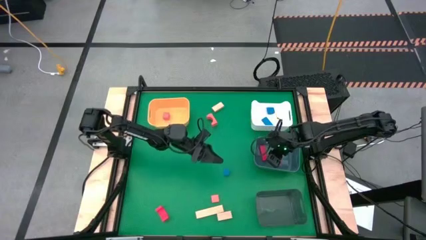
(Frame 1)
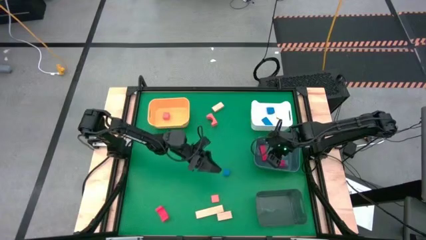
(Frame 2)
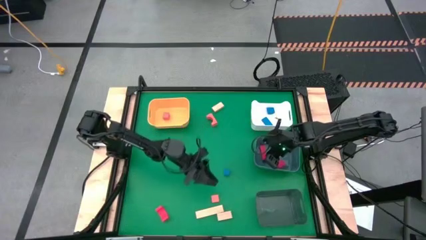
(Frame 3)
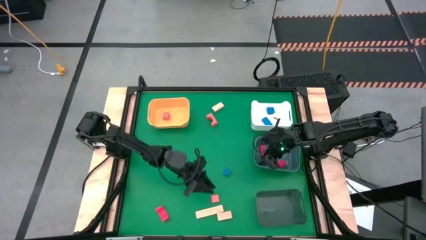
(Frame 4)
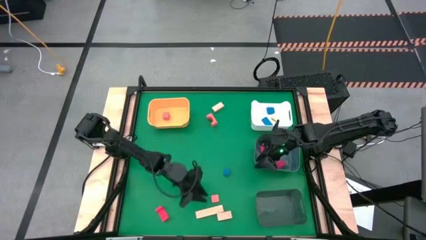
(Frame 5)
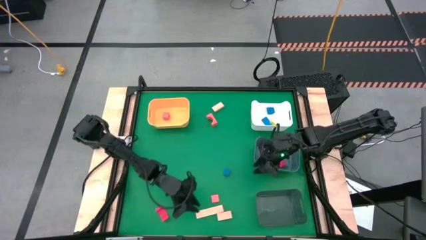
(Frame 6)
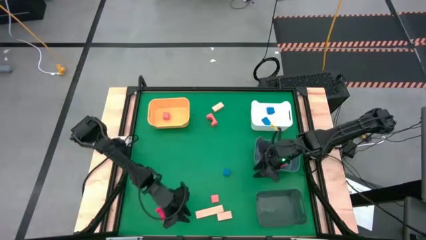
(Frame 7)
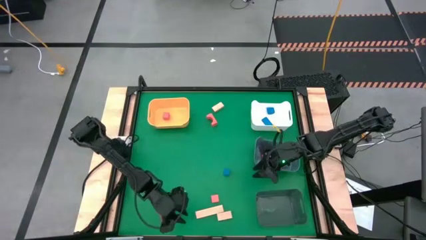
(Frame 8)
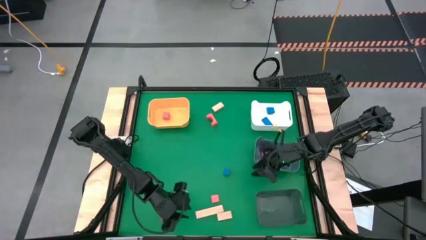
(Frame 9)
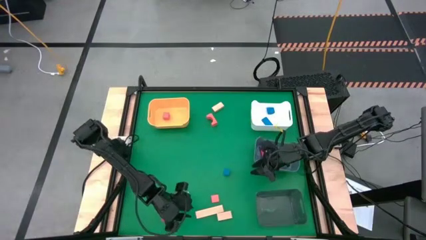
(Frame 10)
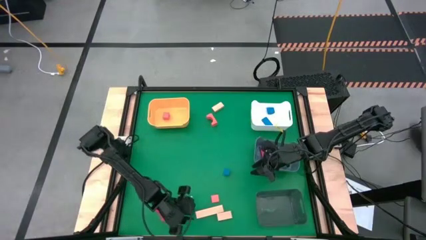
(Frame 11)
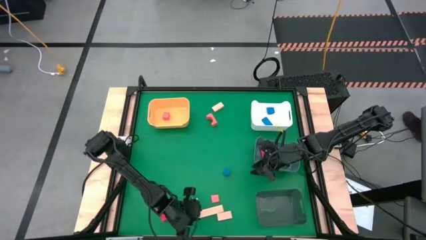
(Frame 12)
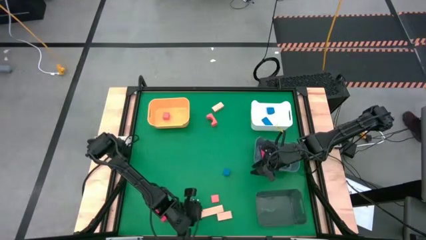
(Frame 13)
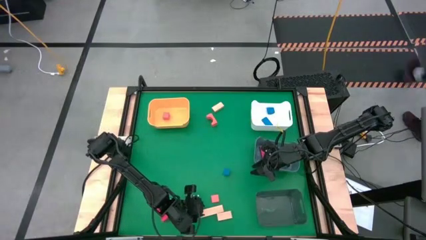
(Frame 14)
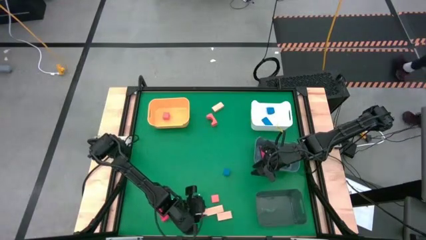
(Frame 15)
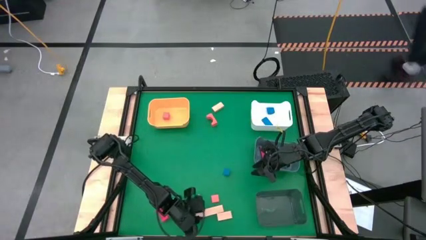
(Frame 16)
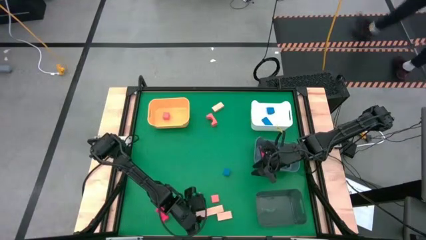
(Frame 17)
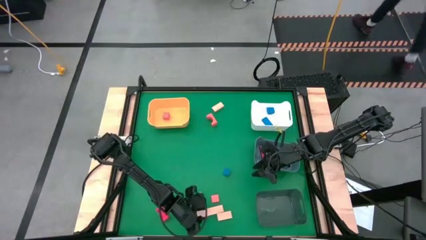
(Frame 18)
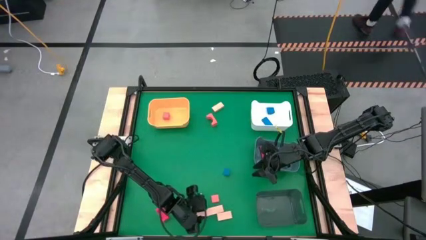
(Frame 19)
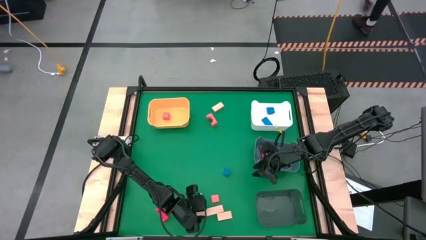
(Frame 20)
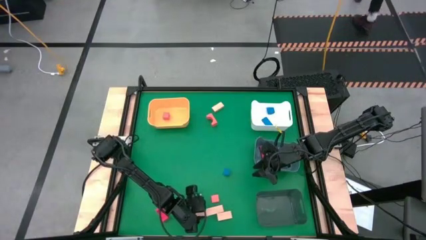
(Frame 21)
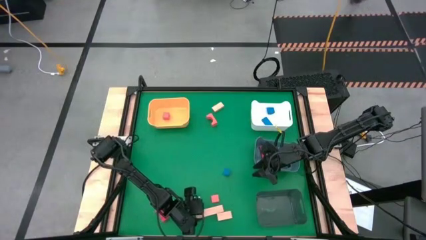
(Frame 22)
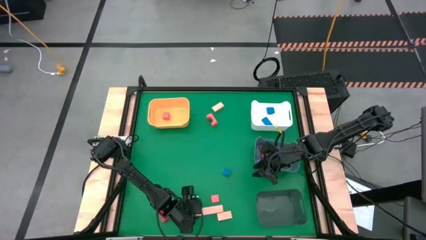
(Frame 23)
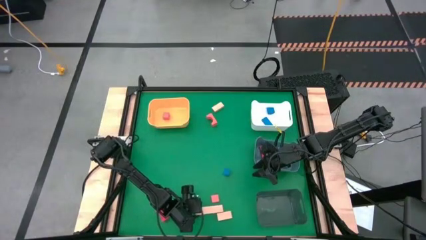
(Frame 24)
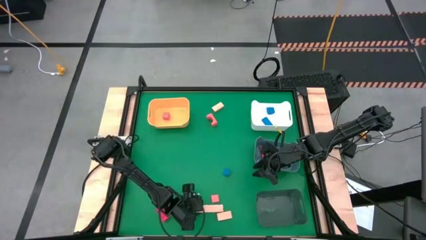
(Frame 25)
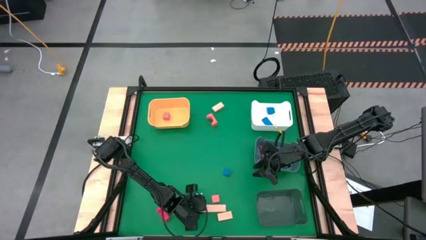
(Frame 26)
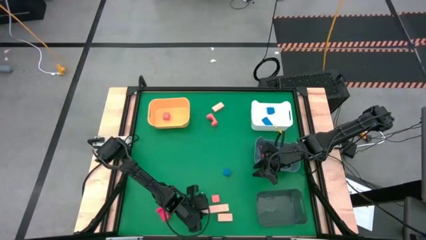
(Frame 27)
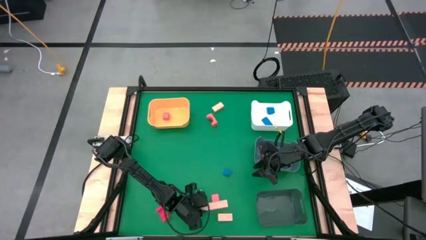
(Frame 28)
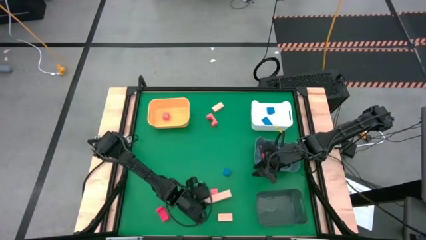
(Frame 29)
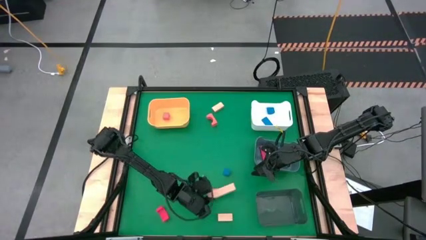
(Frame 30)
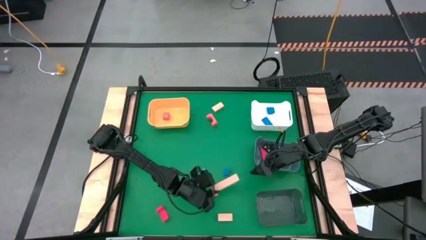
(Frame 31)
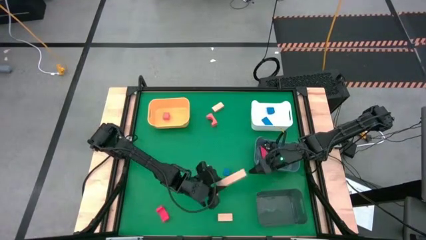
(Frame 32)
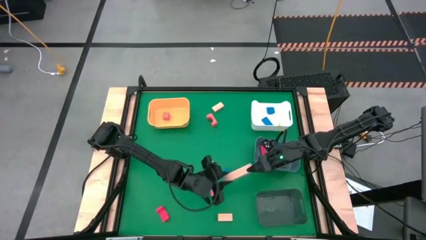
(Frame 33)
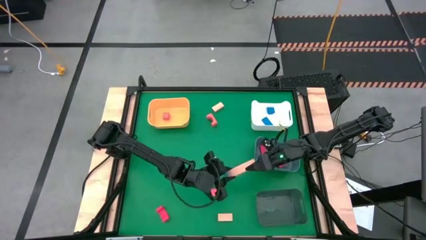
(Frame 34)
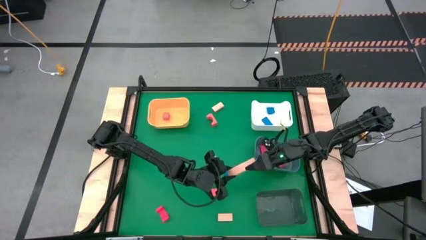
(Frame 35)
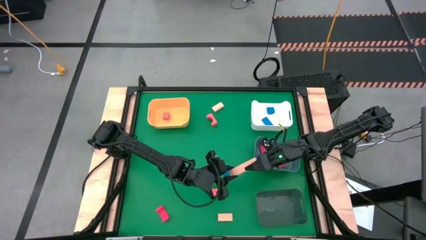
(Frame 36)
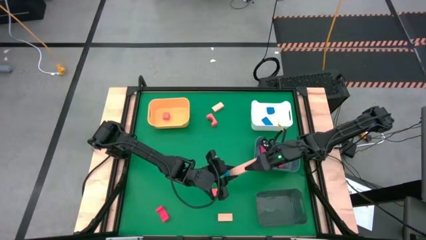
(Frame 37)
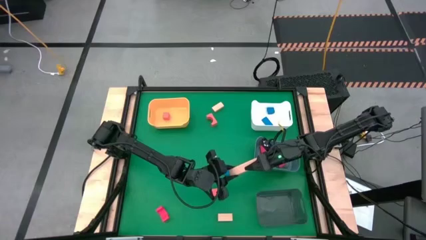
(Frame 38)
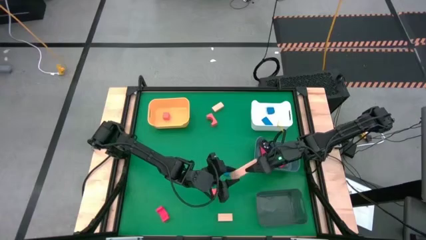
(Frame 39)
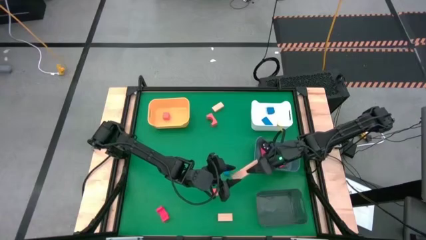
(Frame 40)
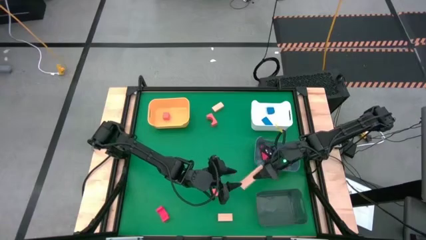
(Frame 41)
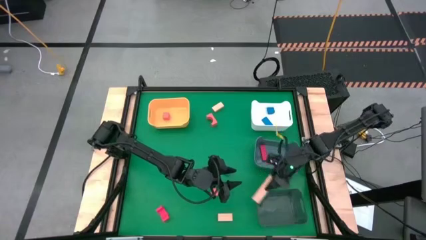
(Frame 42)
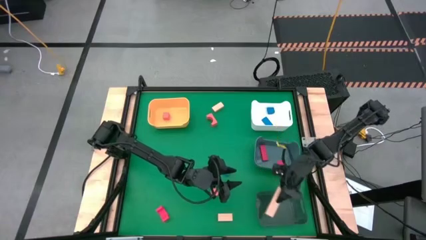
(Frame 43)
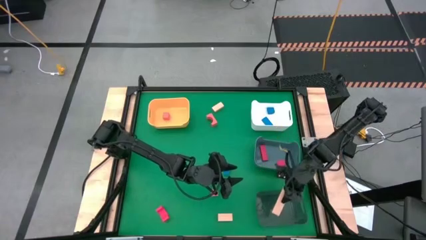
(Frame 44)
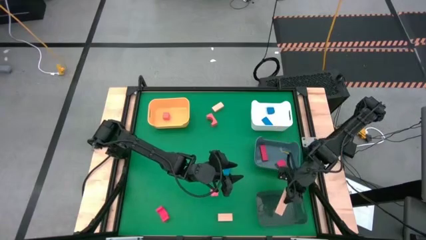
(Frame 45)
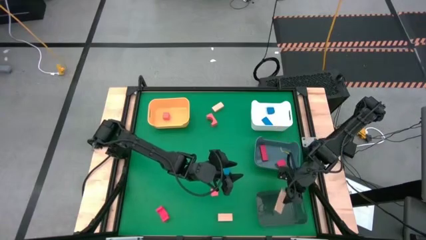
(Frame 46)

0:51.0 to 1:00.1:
Task: Sort & place blocks by color
Put the middle brown block into the black bin

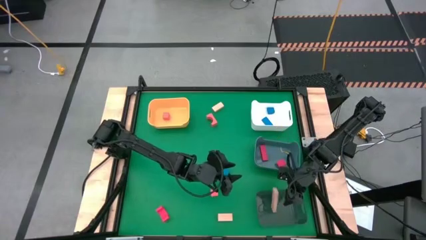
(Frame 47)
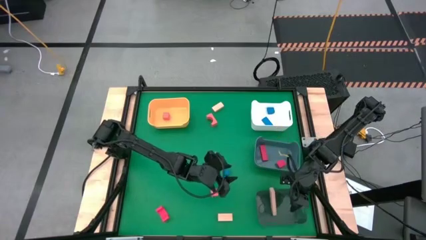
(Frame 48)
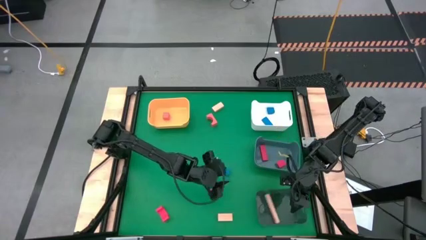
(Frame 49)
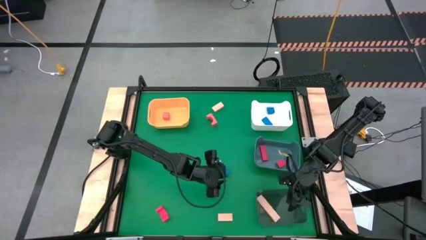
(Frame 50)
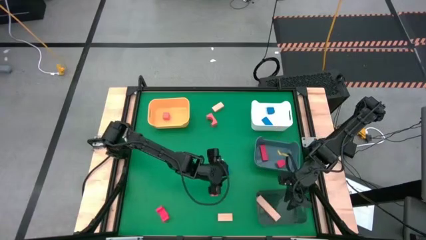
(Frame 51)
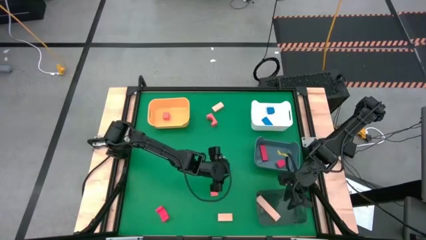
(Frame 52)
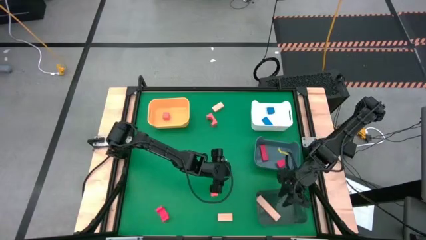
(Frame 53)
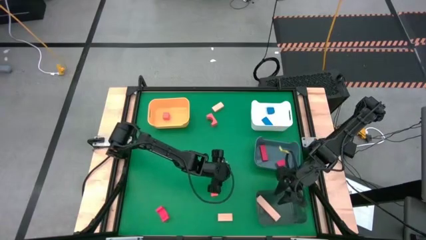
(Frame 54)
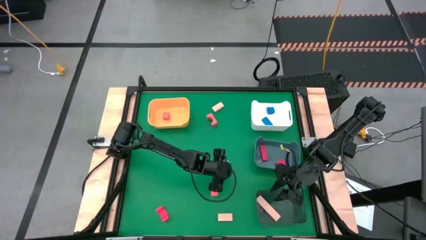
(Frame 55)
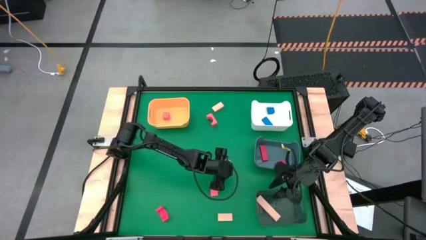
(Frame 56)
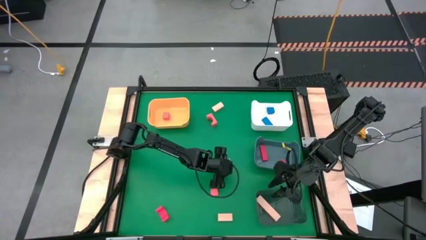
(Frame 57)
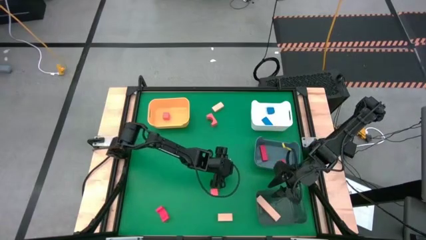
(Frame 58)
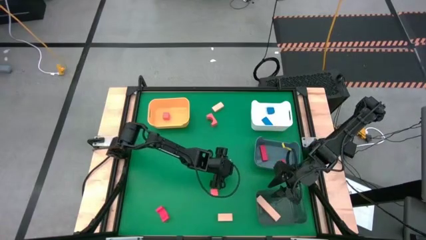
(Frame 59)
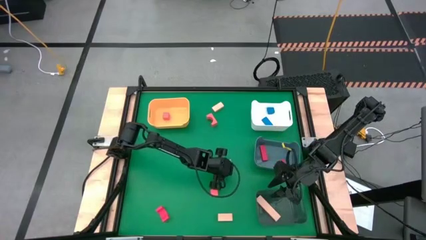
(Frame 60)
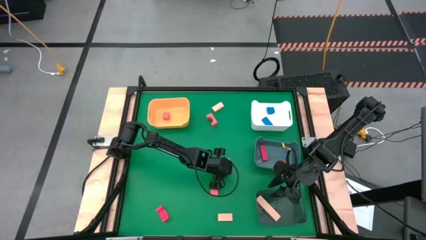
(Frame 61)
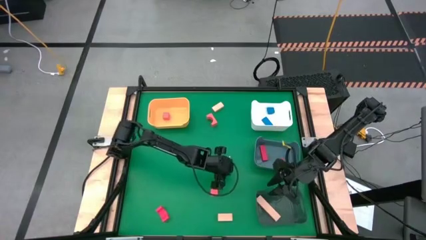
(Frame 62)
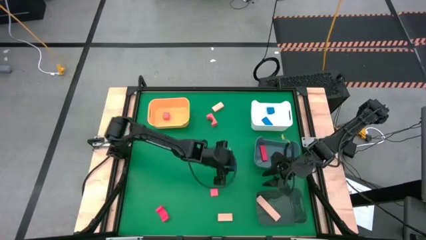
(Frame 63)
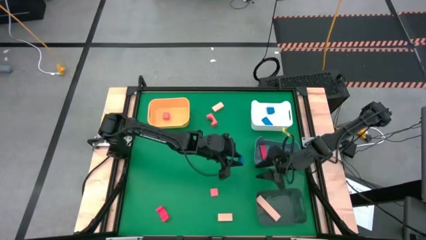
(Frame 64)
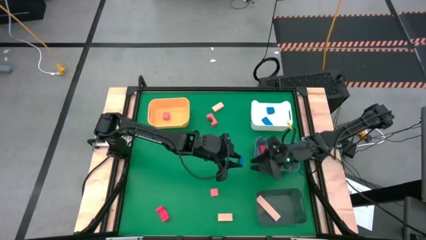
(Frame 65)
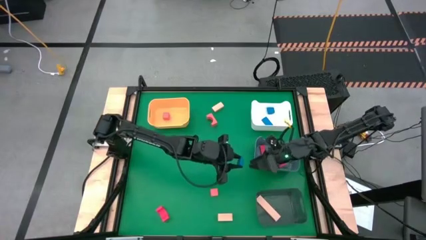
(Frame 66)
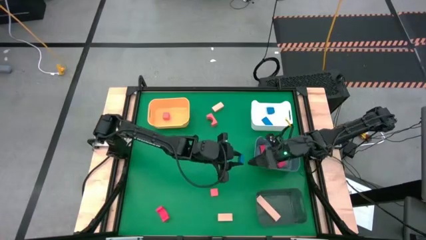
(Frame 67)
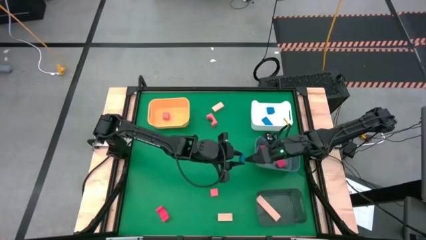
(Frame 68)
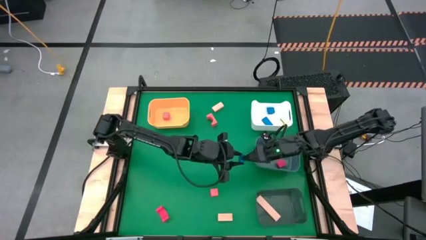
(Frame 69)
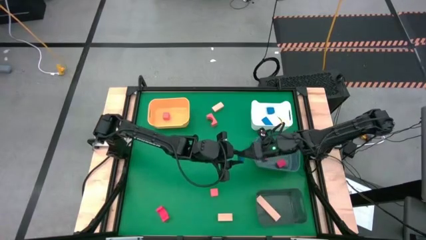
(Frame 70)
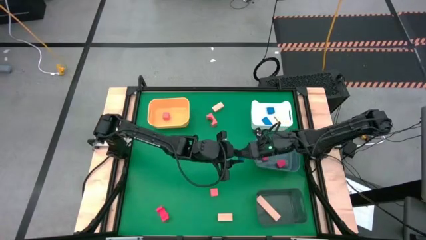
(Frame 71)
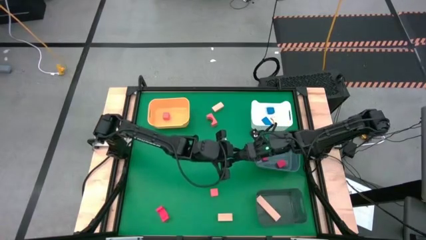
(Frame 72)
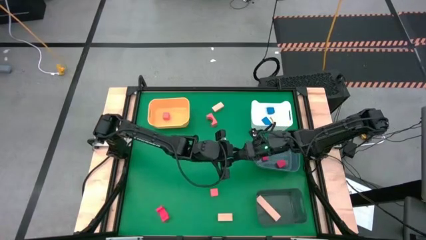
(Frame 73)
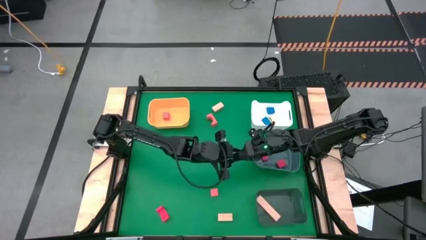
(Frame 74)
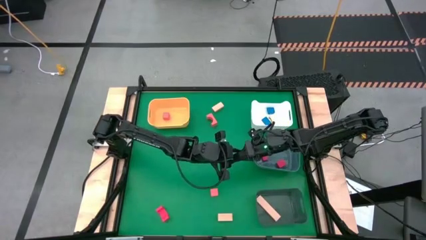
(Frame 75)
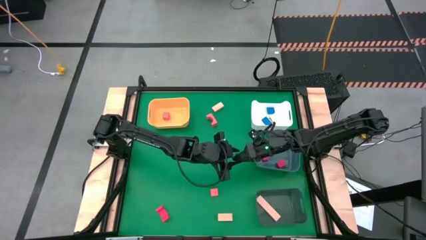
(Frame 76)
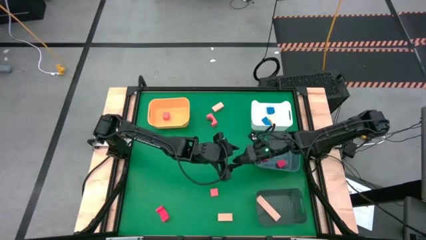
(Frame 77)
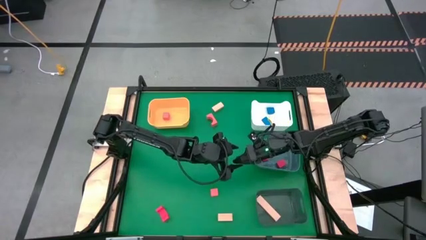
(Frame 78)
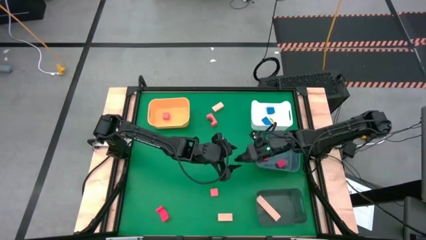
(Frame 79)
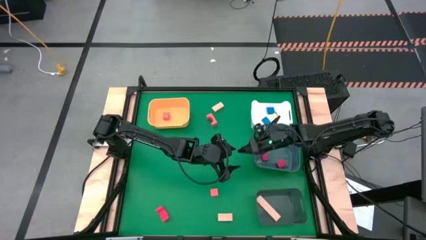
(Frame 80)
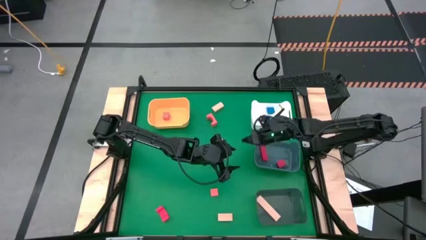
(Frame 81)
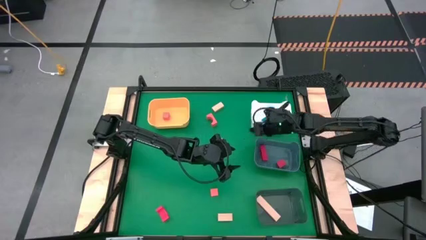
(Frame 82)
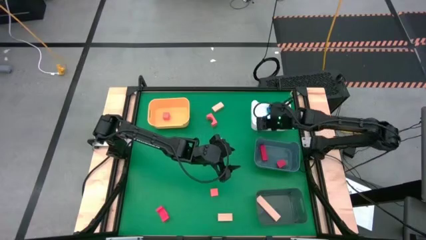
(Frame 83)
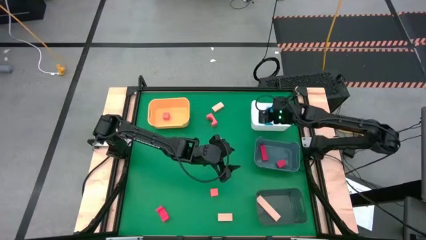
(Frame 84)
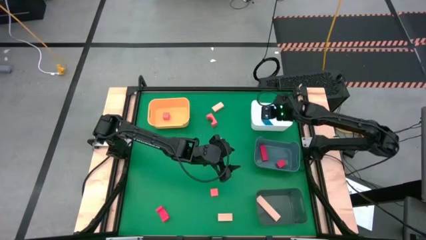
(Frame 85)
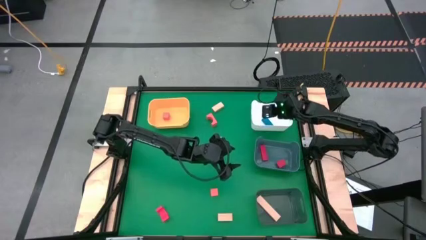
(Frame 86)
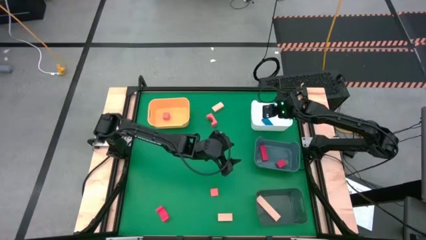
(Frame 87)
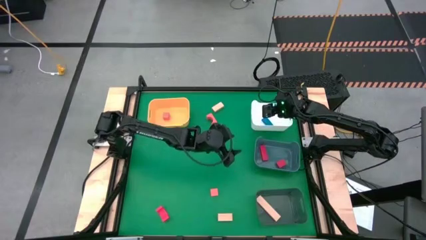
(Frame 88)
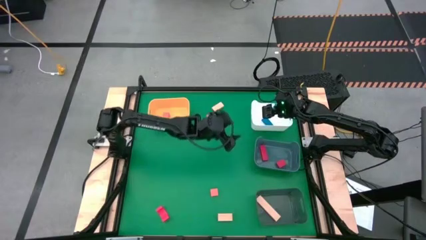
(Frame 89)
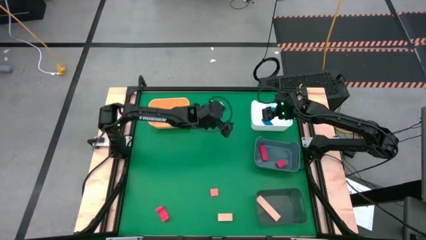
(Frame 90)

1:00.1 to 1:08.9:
Put the blue block into the white bin
